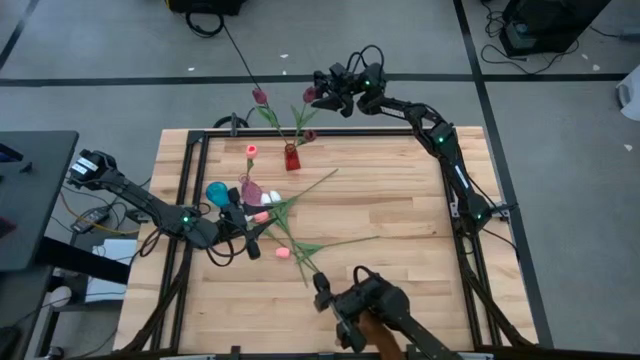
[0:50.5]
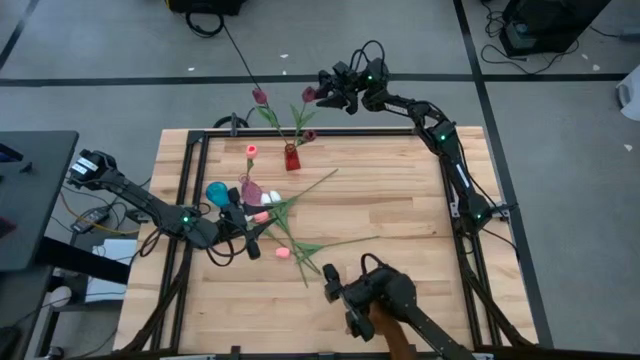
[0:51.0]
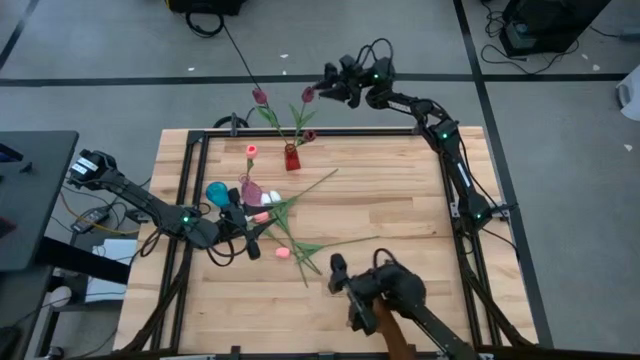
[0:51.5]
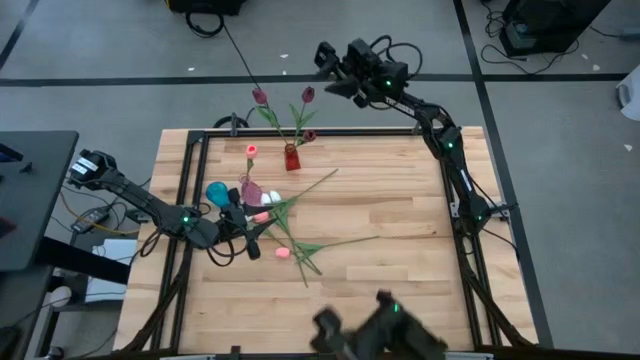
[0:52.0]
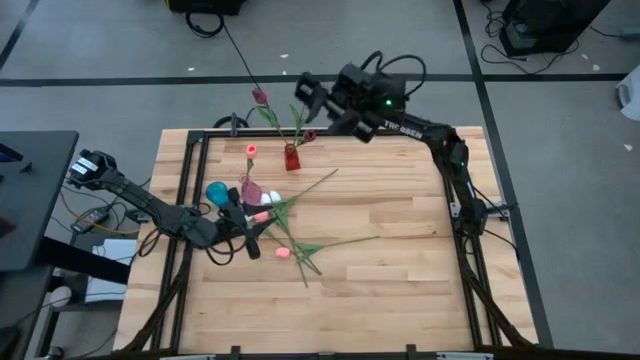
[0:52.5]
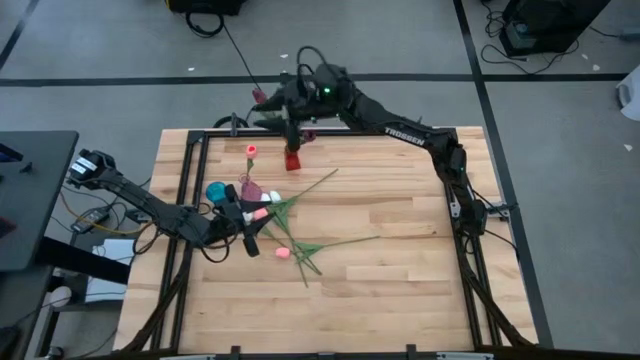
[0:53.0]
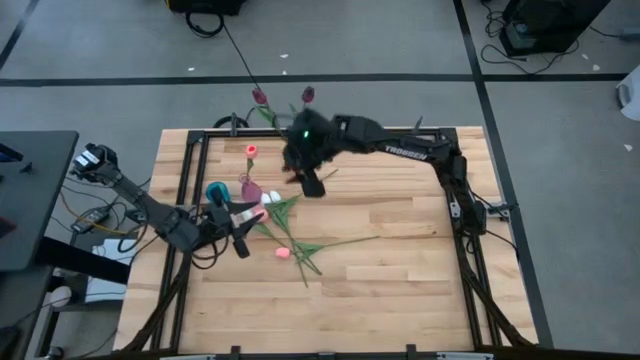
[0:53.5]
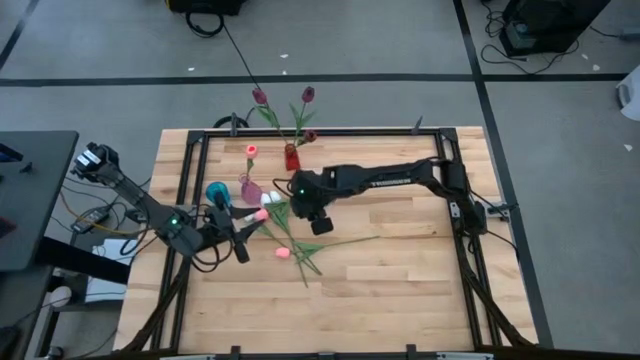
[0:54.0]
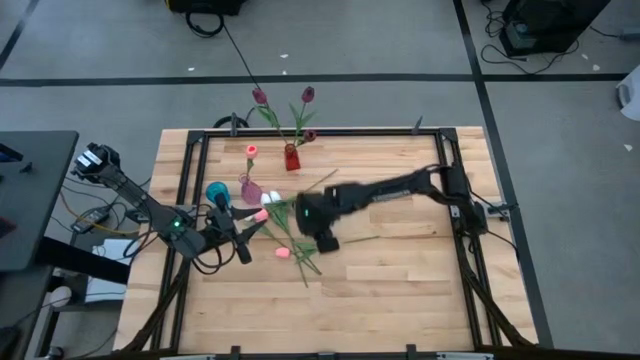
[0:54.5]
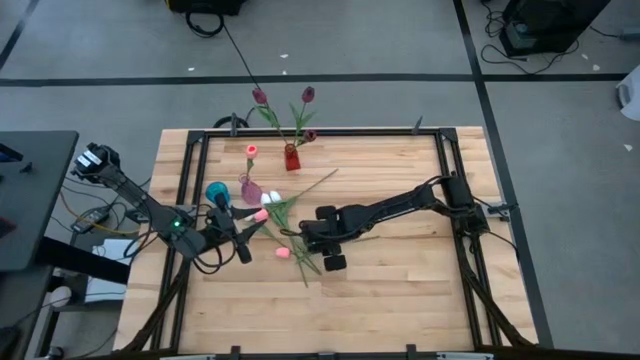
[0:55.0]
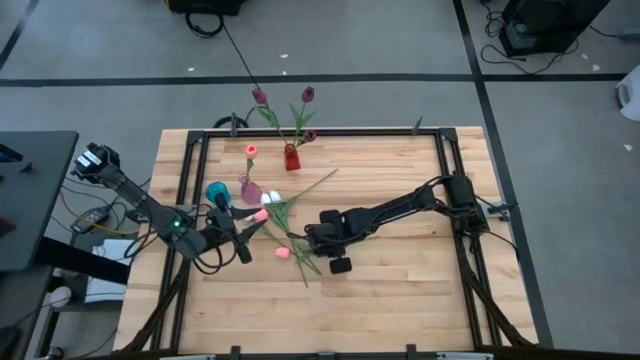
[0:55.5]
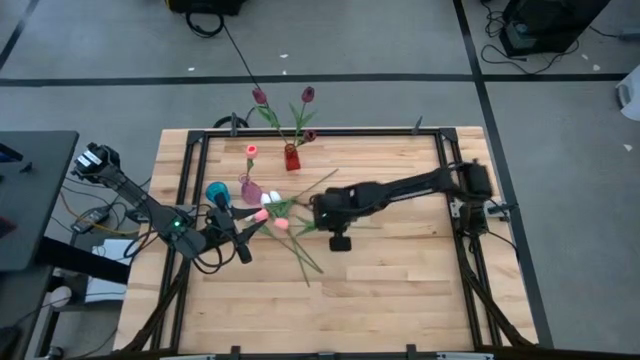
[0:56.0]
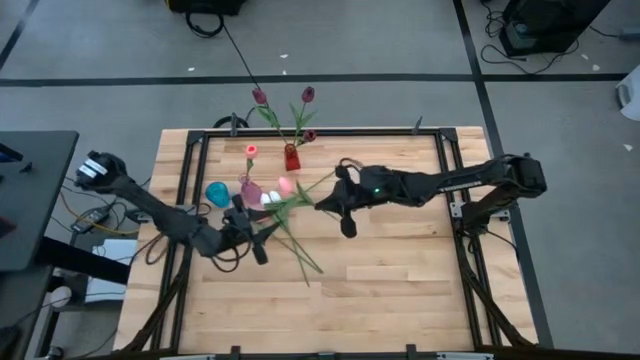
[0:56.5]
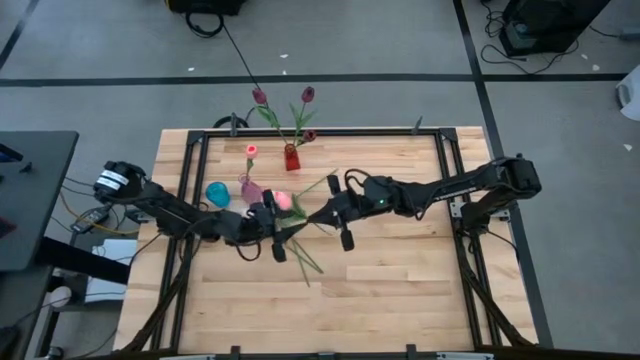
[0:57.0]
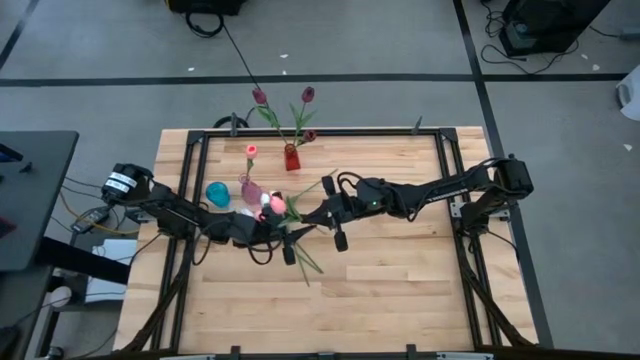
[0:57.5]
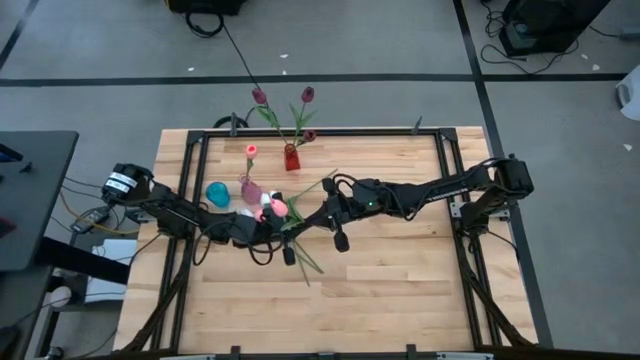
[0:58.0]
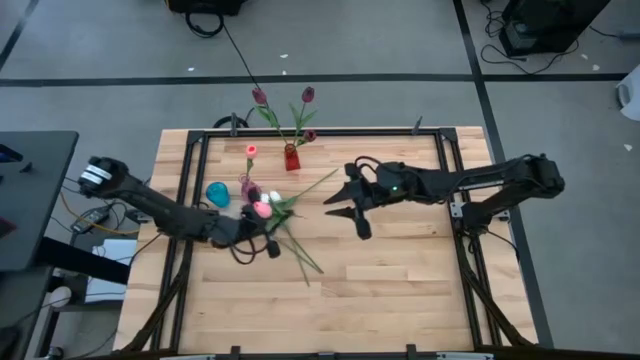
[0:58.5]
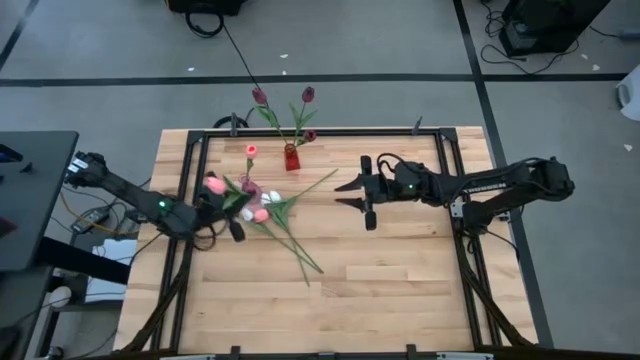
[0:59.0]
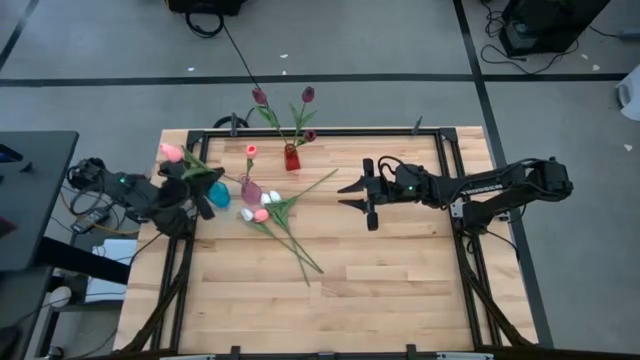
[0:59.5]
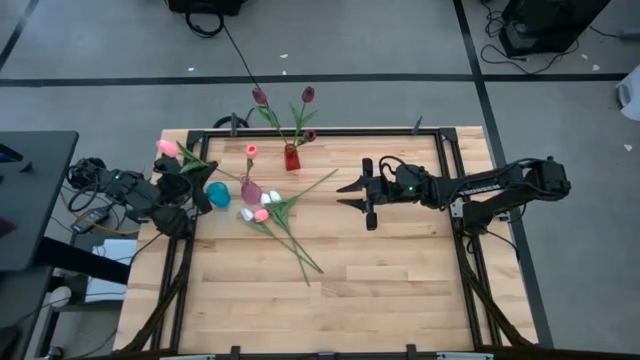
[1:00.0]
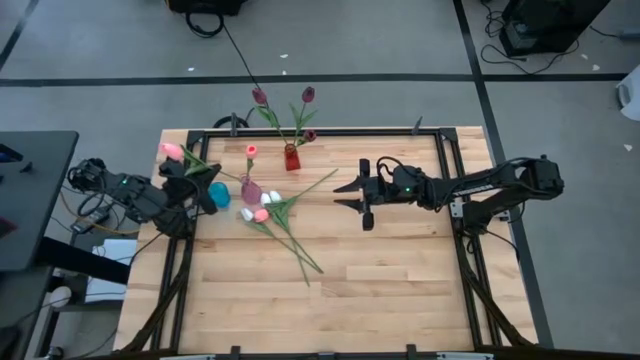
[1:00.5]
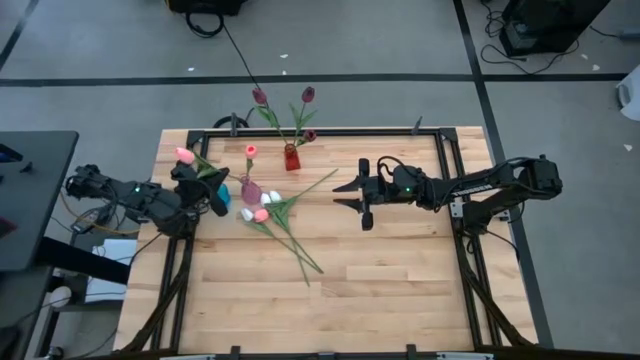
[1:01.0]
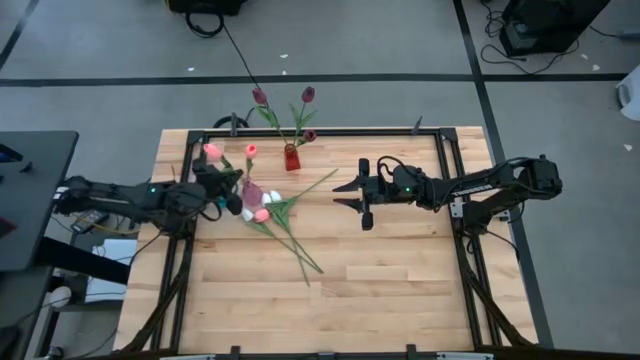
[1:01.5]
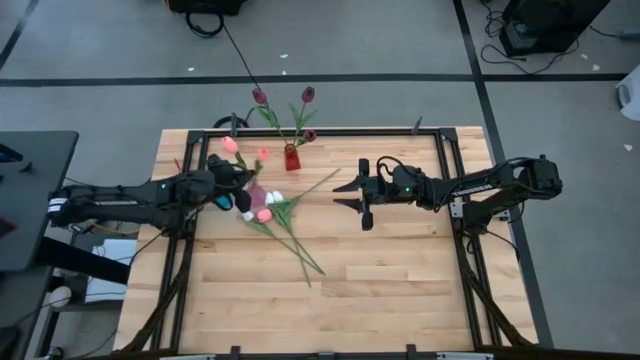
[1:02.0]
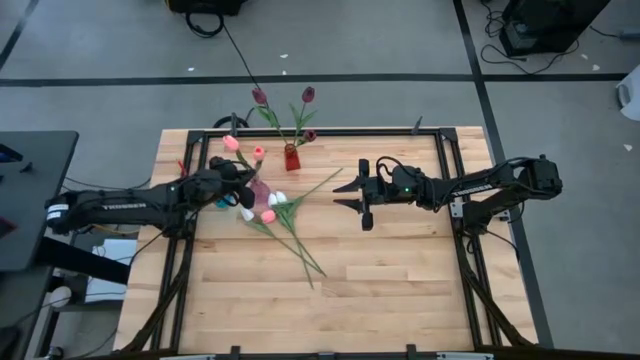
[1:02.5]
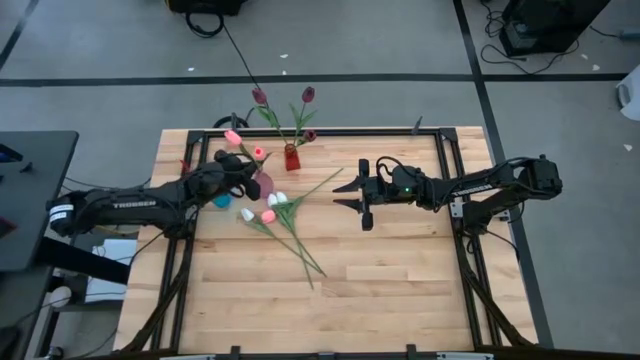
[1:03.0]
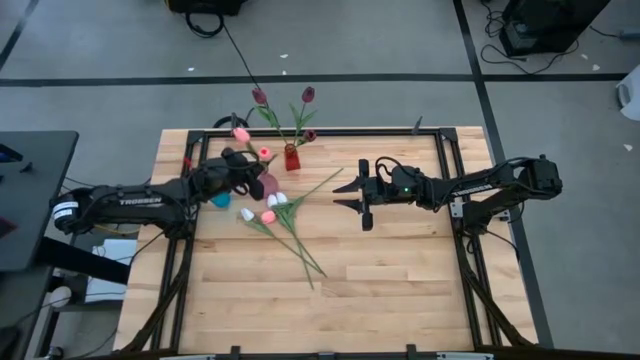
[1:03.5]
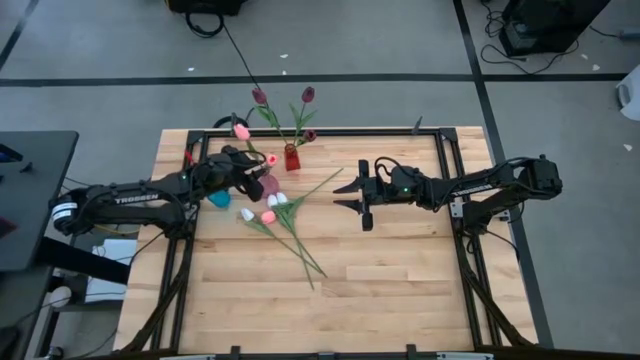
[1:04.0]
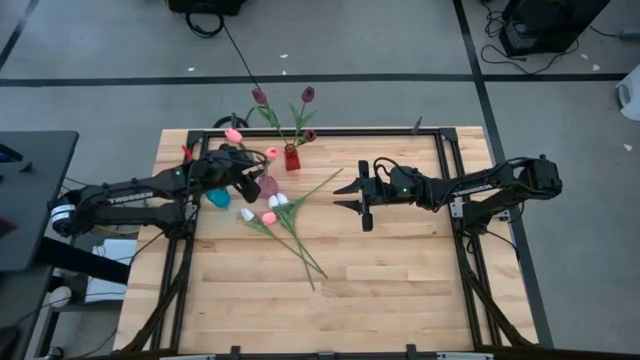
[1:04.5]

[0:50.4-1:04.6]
Task: Sort flowers into vase by color
Put the pink flower into the purple vase

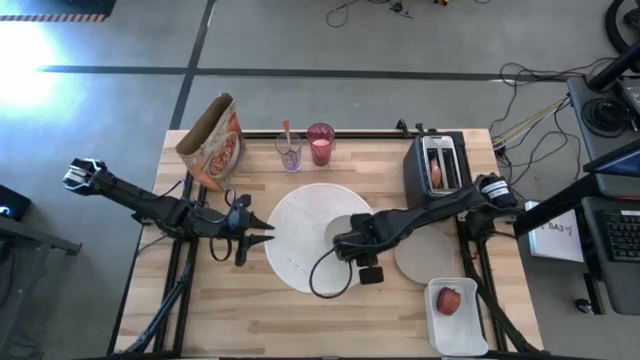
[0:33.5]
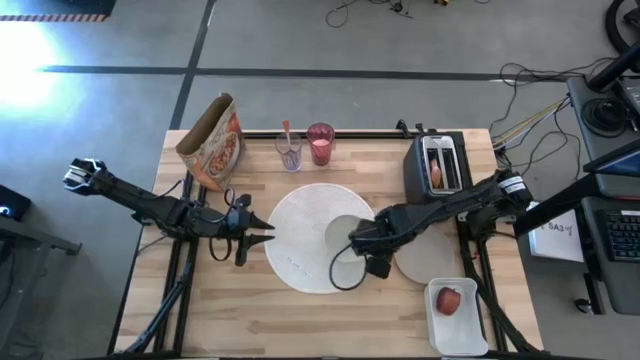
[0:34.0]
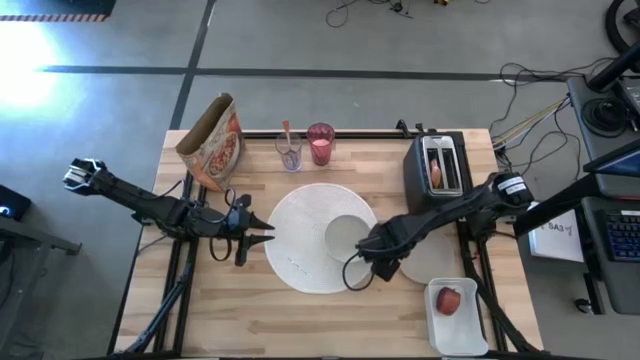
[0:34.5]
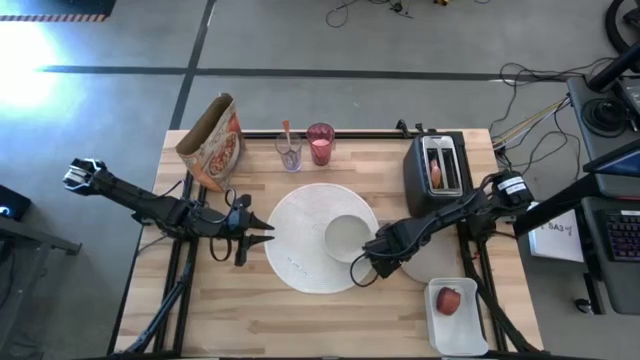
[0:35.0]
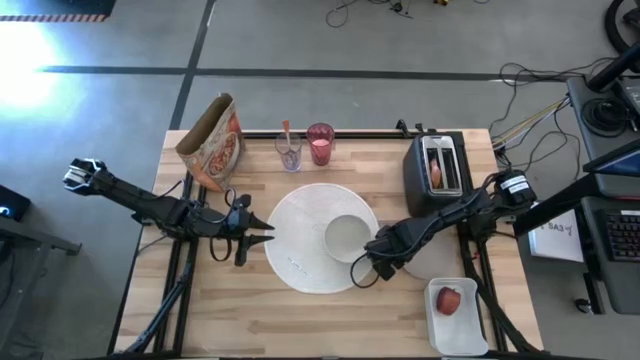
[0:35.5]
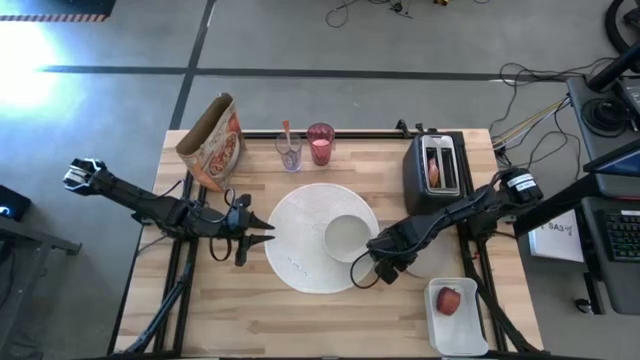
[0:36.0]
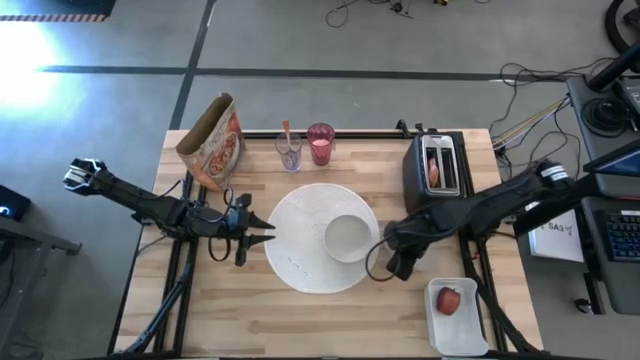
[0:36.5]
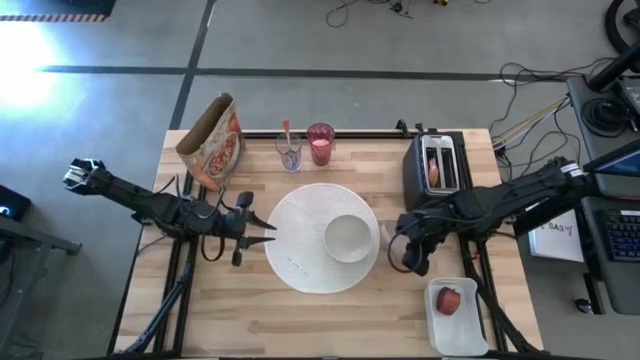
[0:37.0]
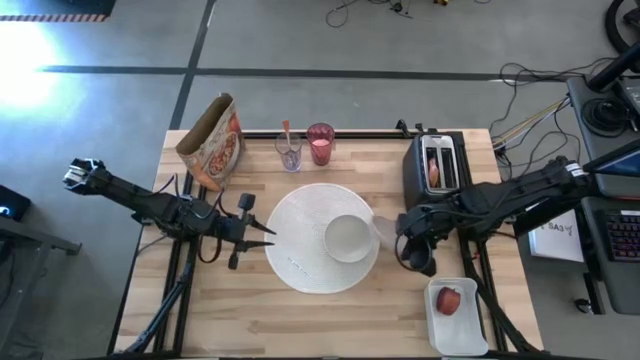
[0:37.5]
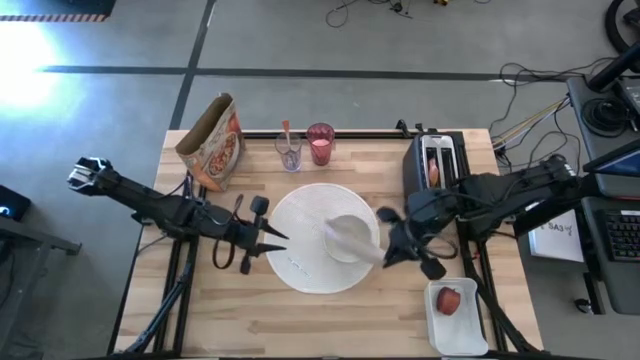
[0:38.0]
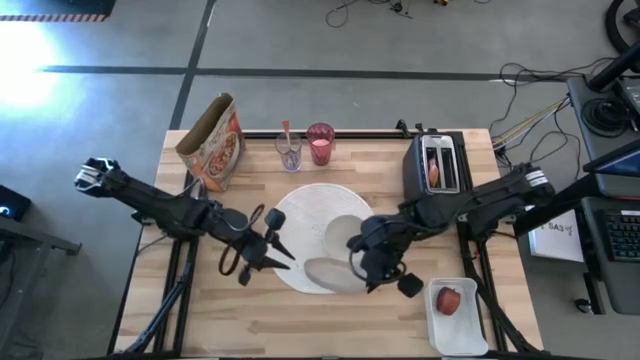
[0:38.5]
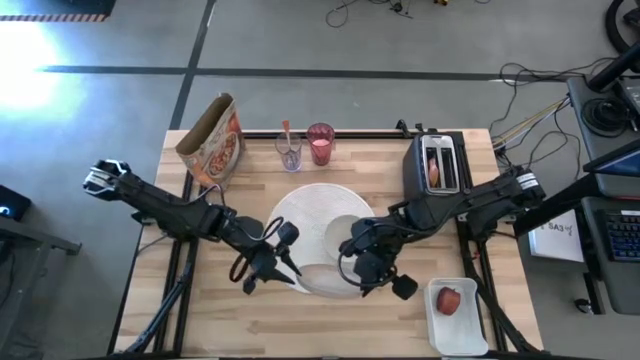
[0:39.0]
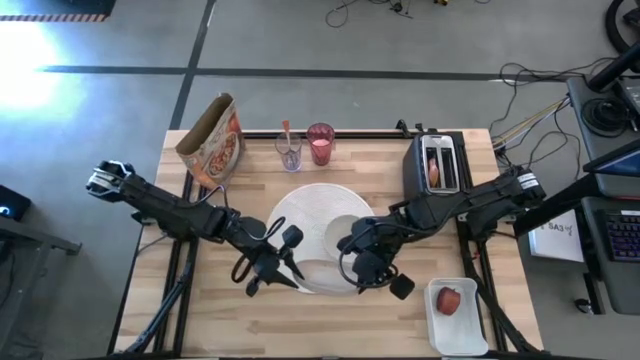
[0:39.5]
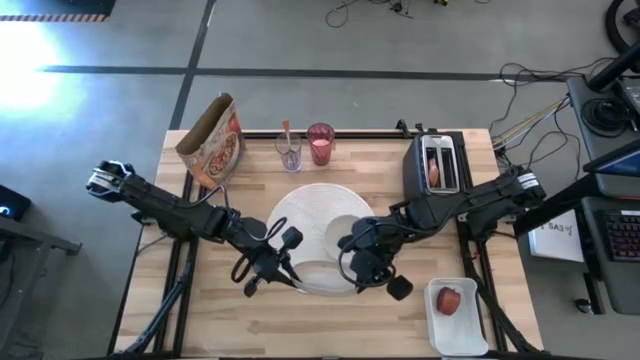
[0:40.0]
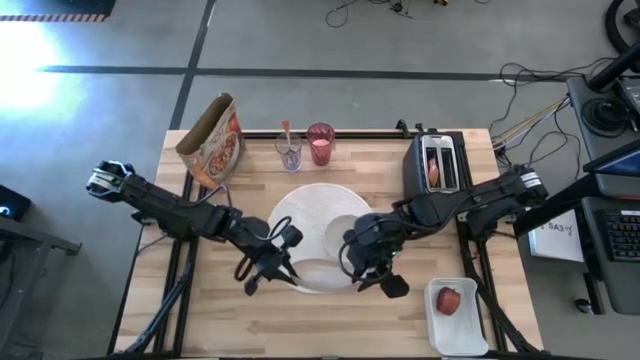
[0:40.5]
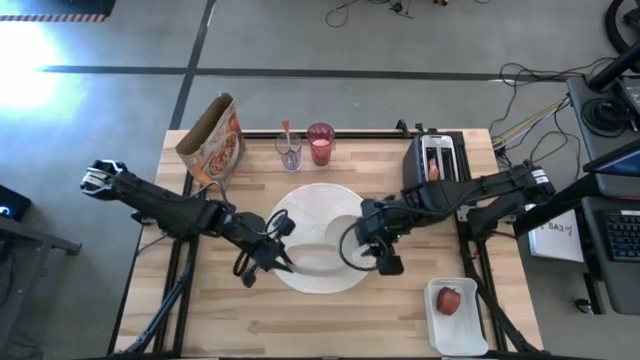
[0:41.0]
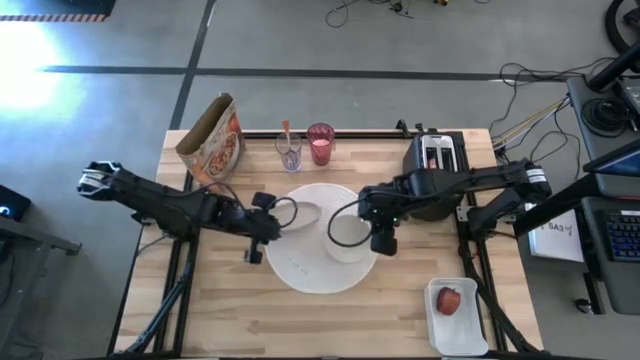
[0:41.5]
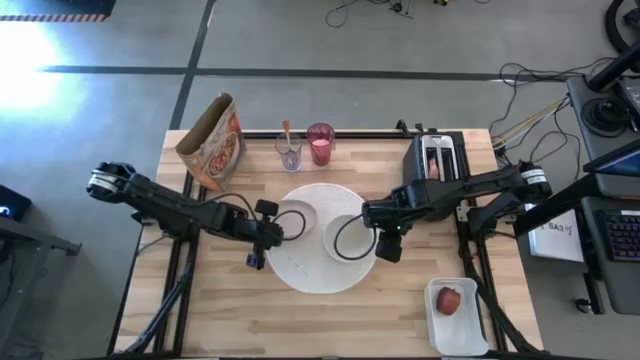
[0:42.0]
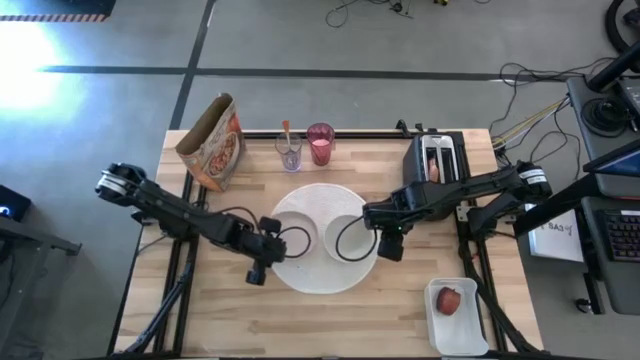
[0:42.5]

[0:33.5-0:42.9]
Task: Arrange a breakfast setting
Put the gray plate on the white table mat
